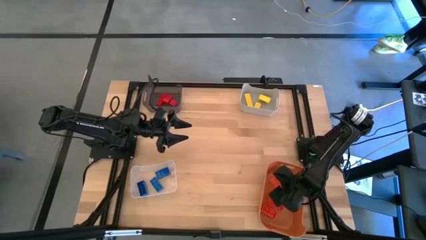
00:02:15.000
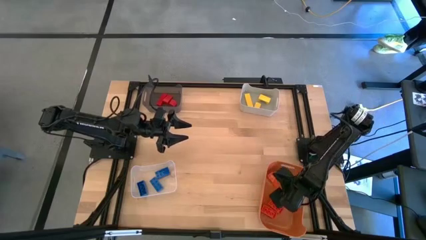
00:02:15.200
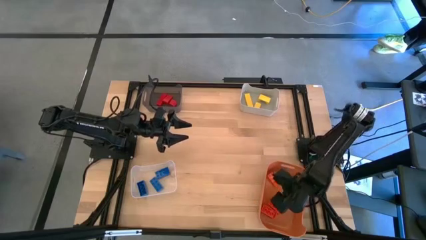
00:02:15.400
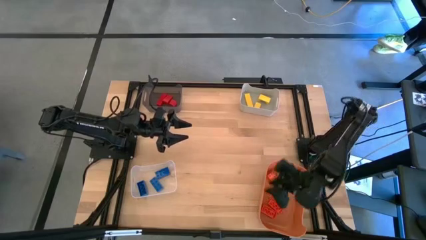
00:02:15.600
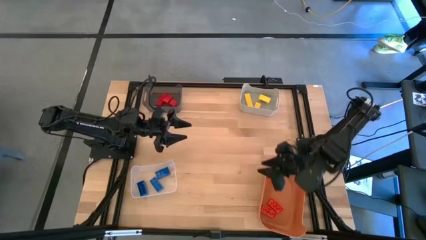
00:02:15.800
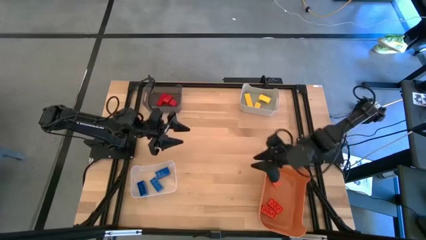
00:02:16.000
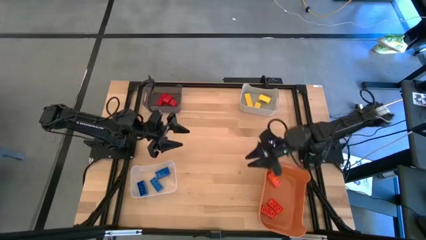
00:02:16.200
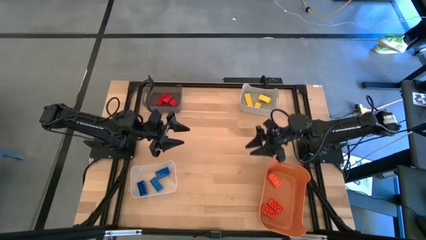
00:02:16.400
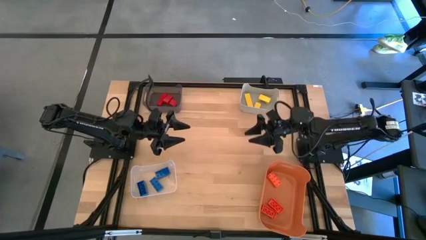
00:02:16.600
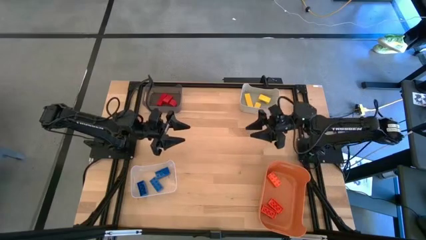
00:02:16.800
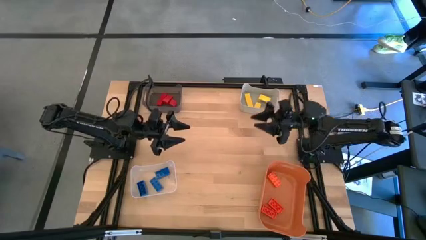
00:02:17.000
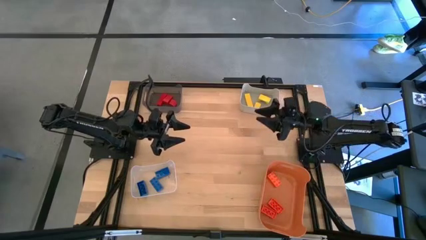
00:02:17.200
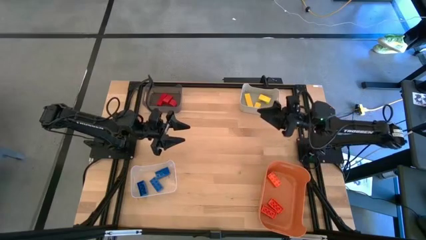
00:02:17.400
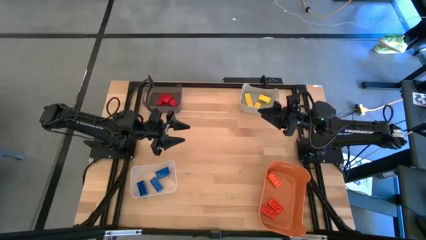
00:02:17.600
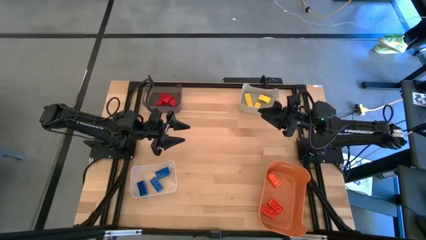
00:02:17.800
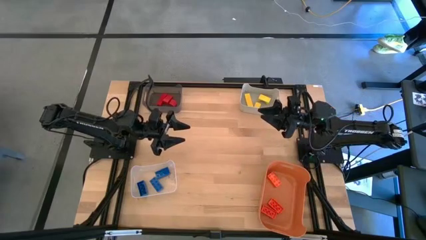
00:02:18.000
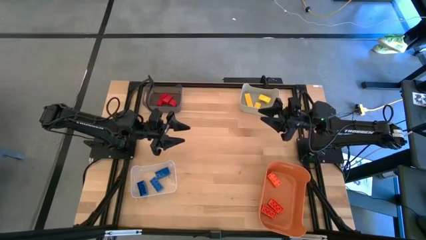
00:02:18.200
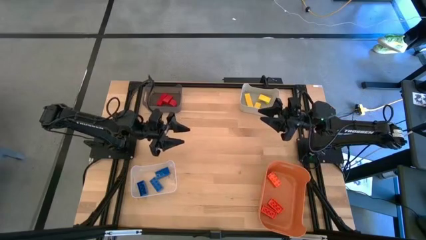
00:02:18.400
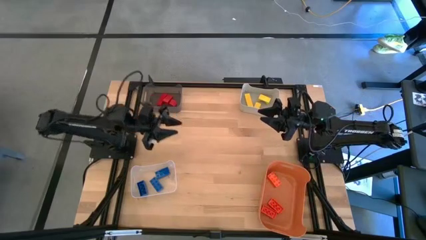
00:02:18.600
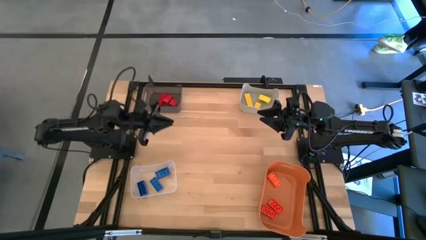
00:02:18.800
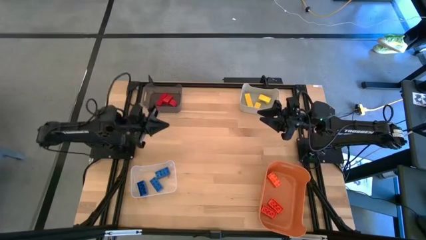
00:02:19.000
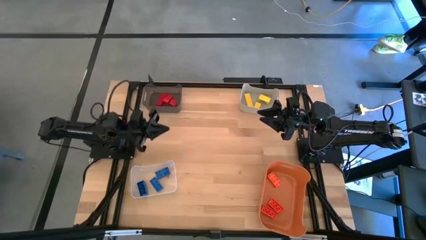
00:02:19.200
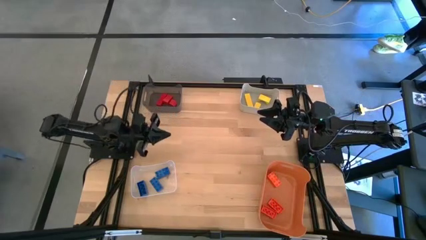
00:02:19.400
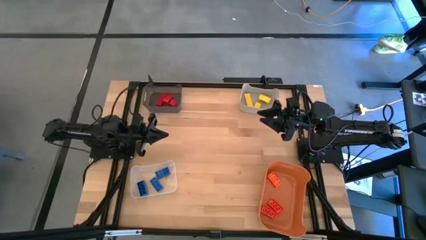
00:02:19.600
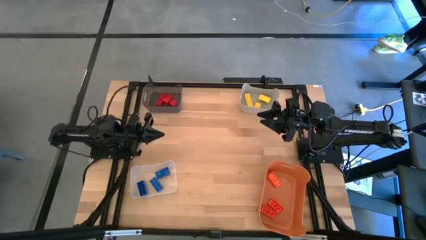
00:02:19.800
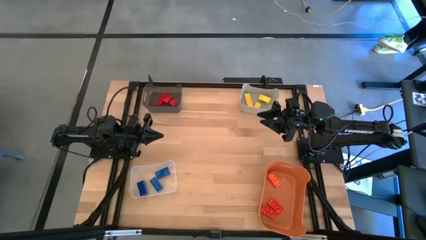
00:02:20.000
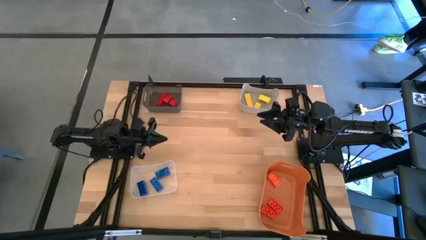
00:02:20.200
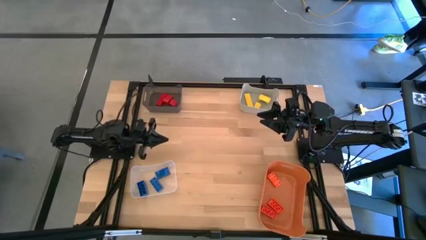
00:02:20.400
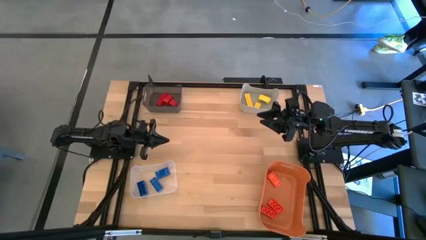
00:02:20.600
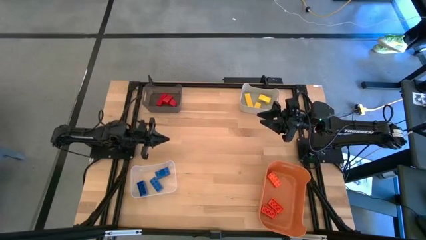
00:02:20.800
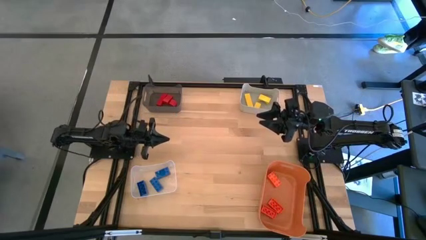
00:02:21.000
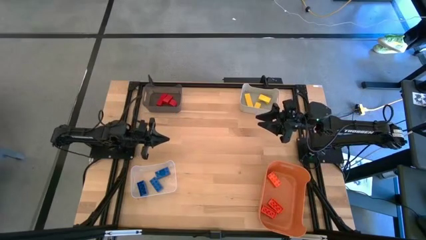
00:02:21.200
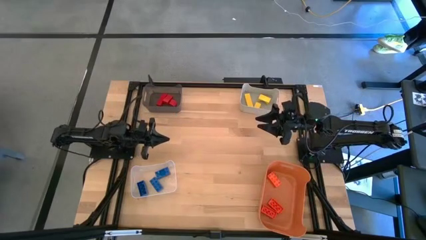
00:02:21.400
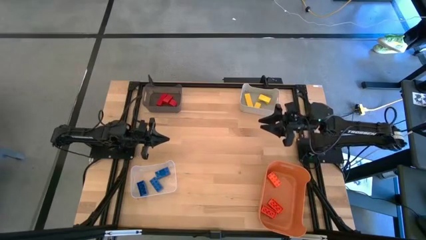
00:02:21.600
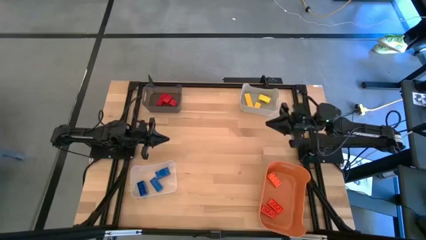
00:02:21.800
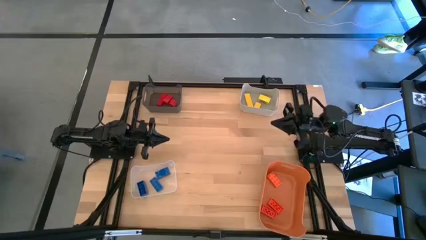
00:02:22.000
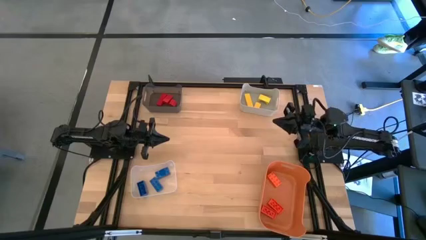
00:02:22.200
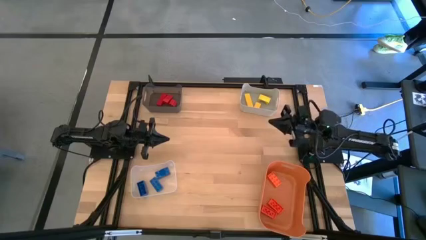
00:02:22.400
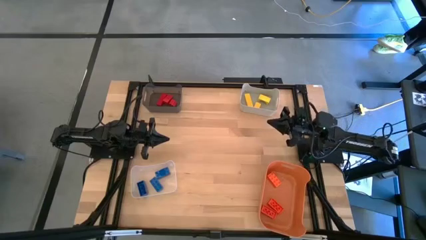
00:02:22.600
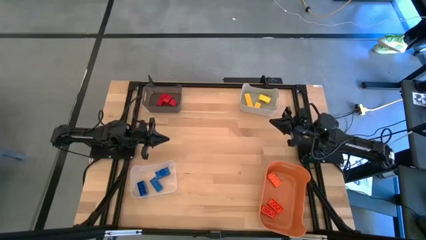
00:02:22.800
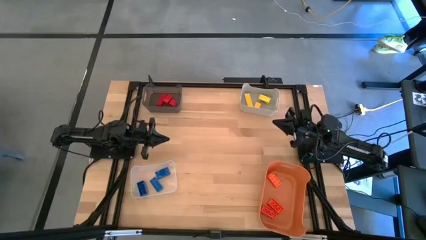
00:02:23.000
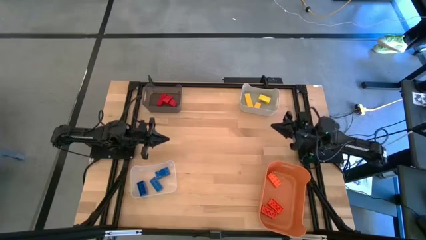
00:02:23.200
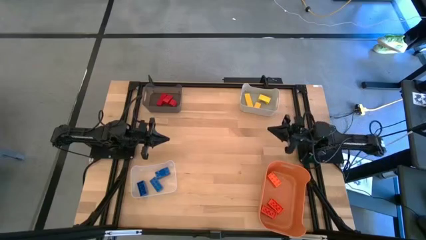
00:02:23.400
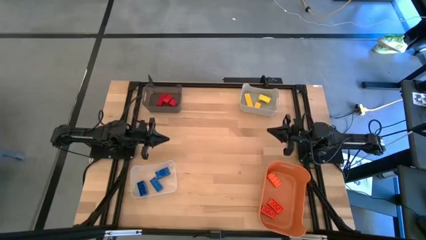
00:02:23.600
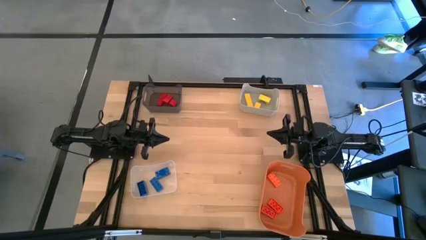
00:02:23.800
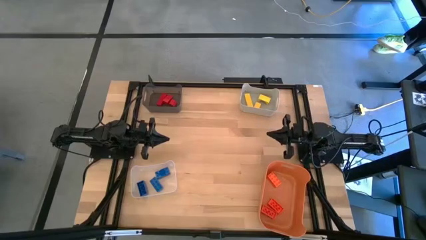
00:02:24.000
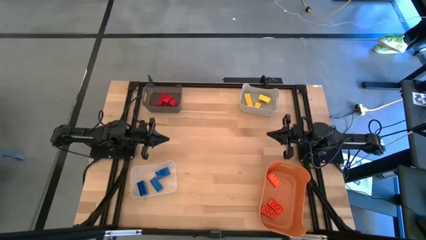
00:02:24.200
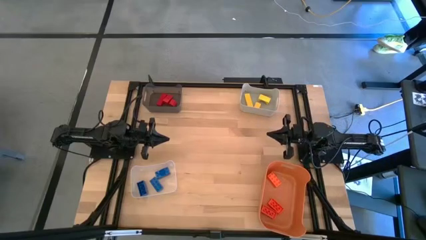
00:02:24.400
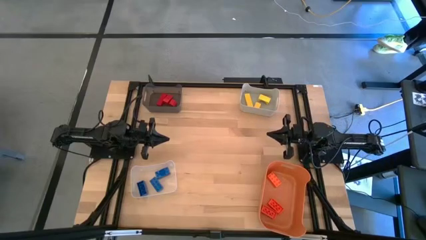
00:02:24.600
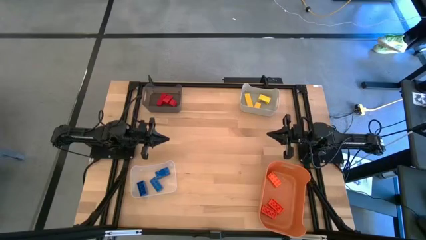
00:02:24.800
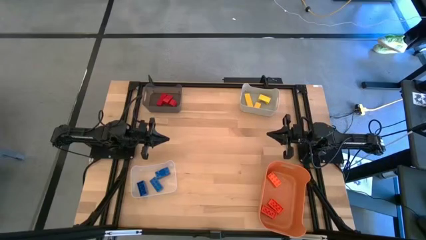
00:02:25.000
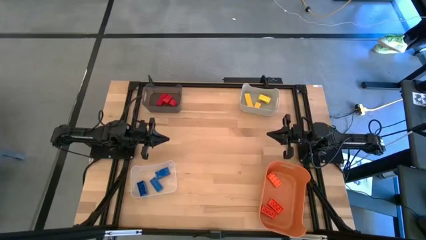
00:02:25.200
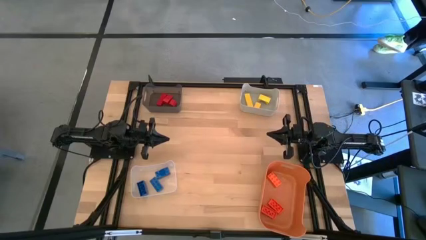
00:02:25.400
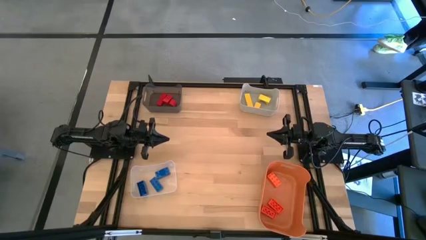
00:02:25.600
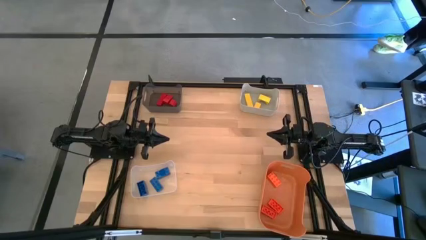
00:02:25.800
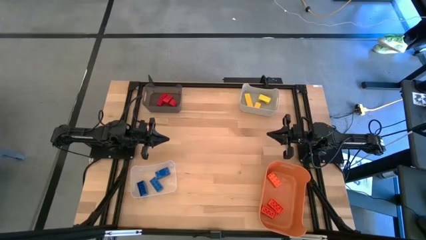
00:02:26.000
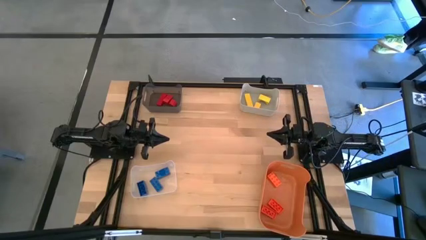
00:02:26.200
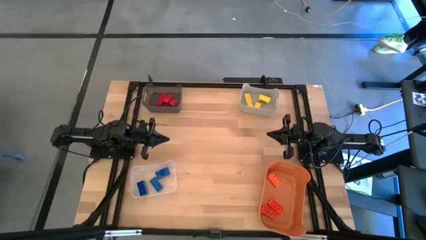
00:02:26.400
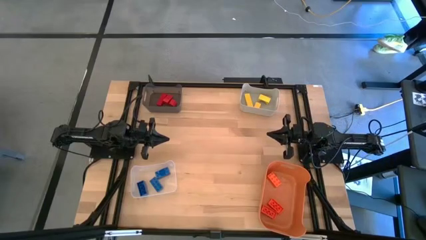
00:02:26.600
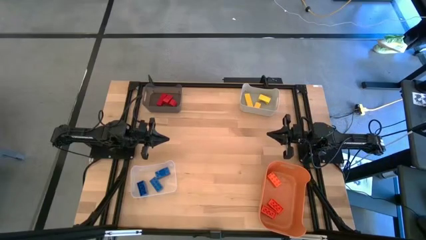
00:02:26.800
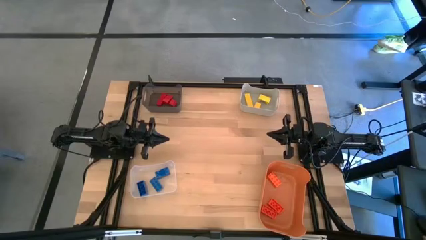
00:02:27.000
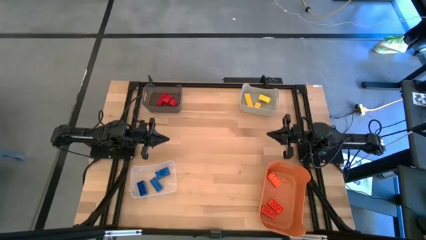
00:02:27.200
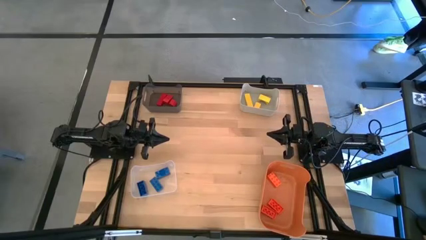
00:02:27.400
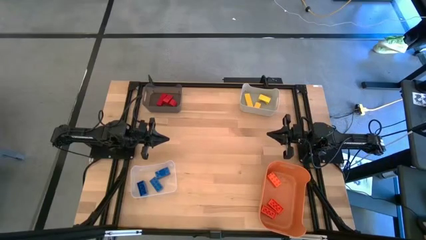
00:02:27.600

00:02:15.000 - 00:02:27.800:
Task: Sort & place blocks by color
Return to Home Position
